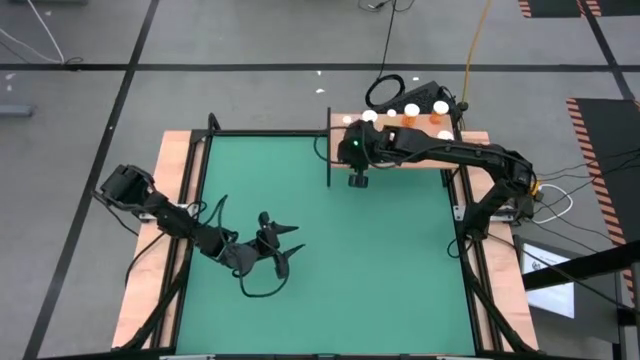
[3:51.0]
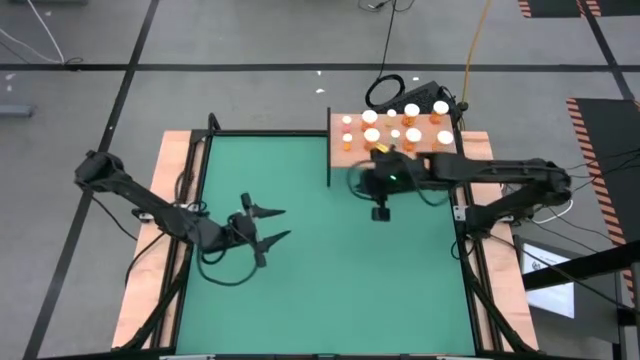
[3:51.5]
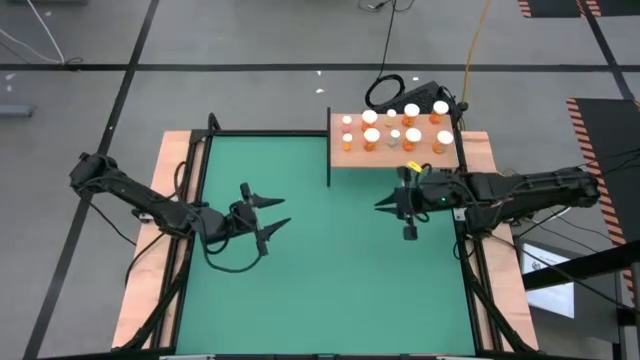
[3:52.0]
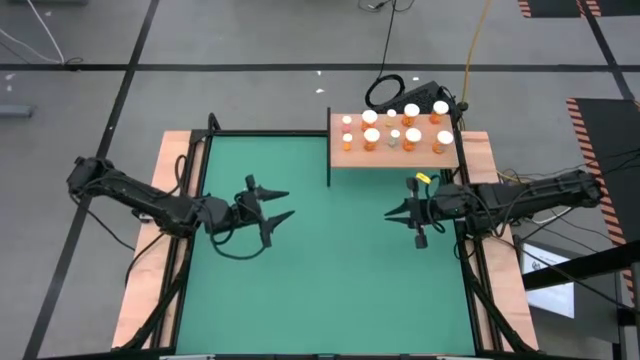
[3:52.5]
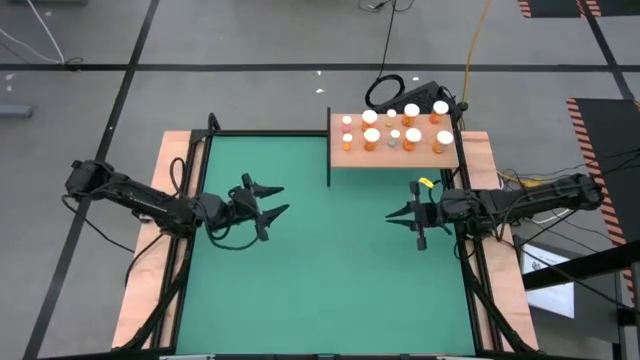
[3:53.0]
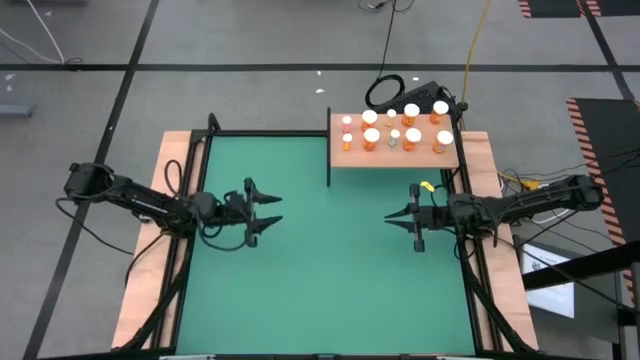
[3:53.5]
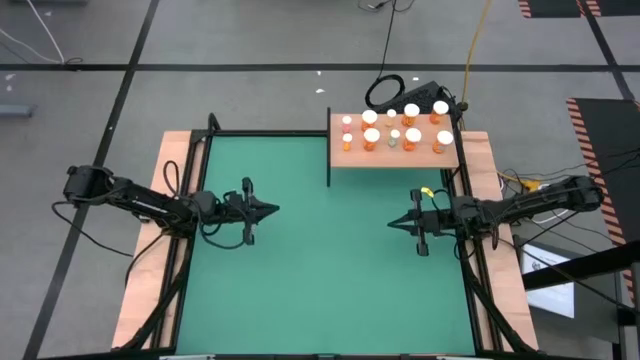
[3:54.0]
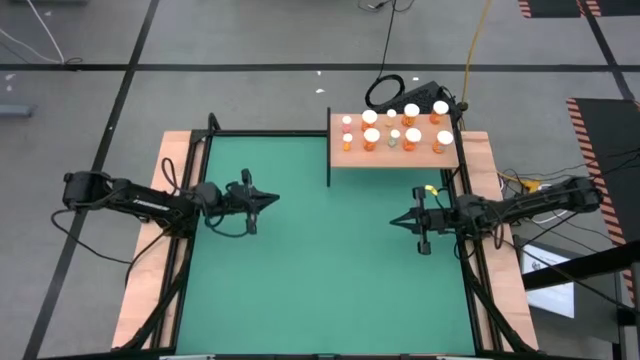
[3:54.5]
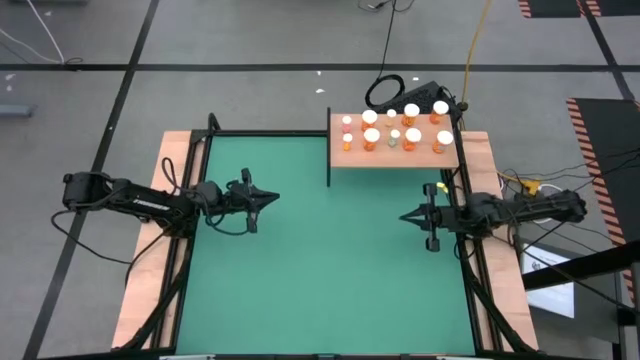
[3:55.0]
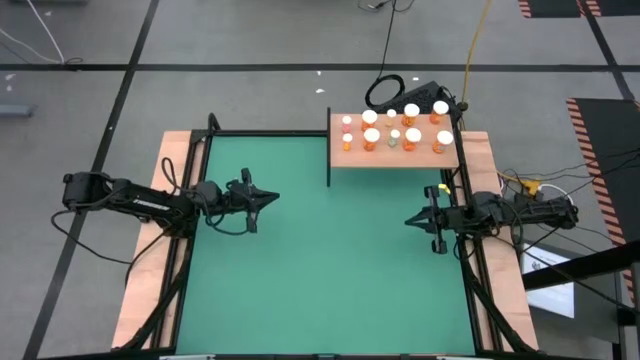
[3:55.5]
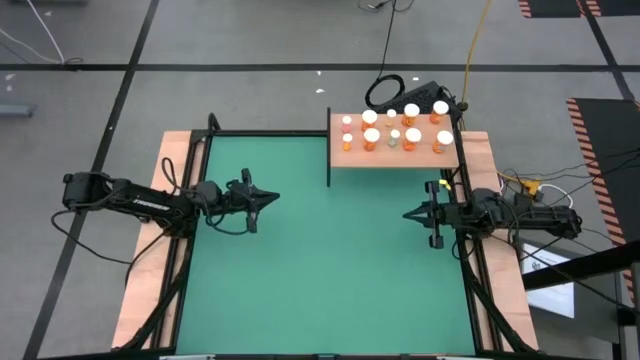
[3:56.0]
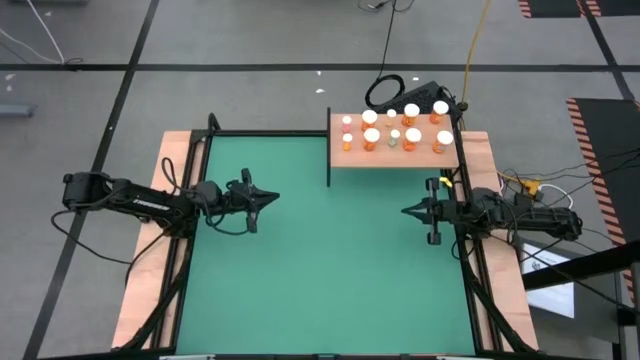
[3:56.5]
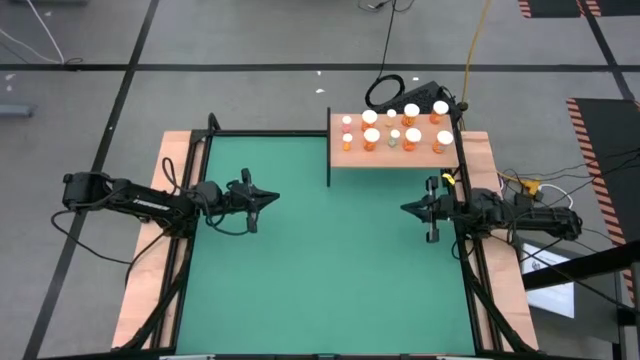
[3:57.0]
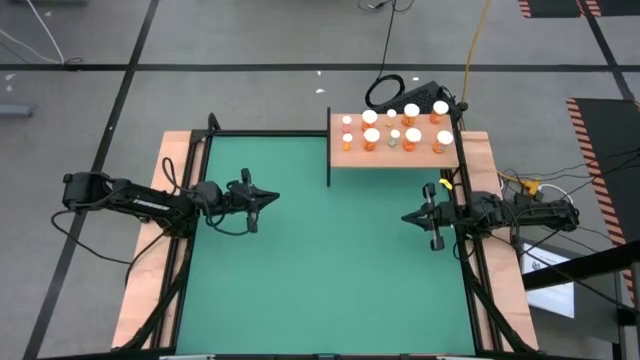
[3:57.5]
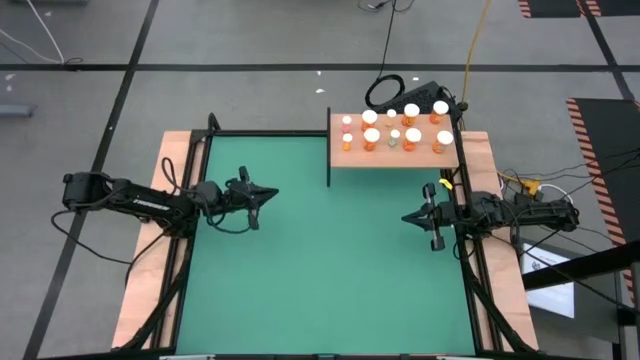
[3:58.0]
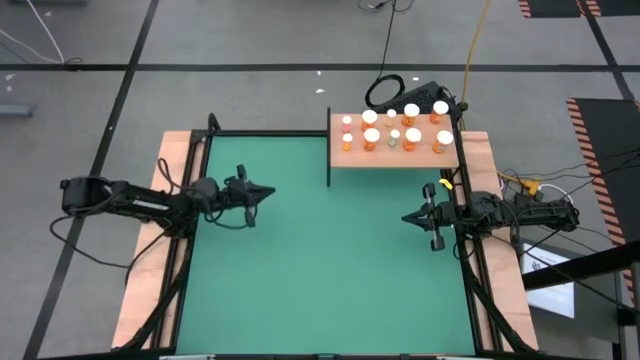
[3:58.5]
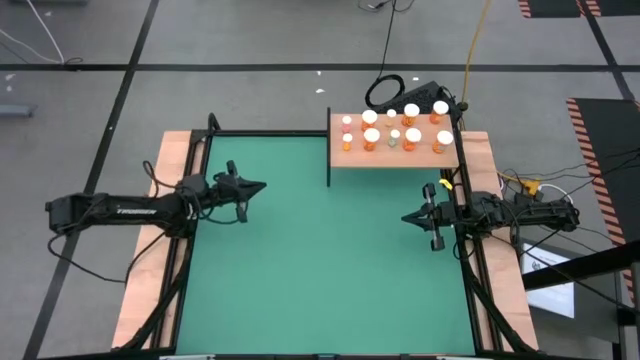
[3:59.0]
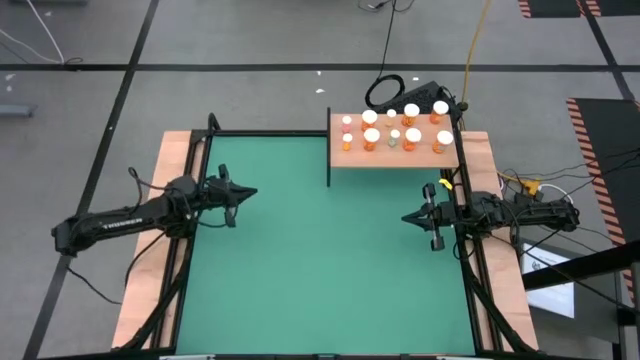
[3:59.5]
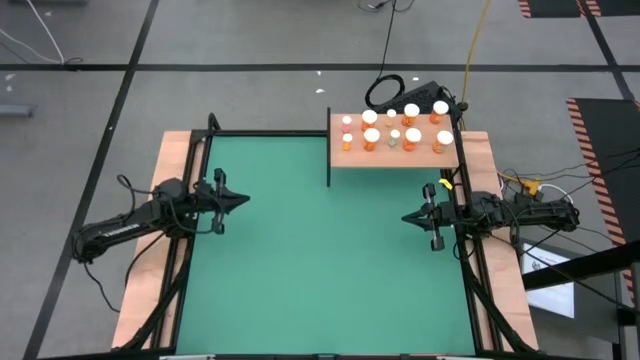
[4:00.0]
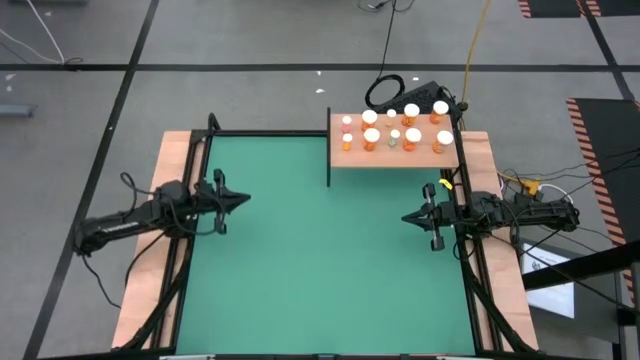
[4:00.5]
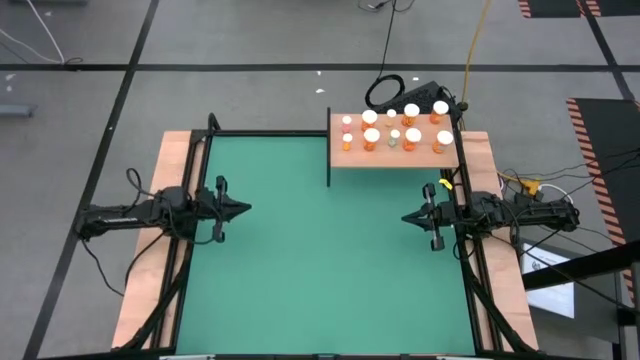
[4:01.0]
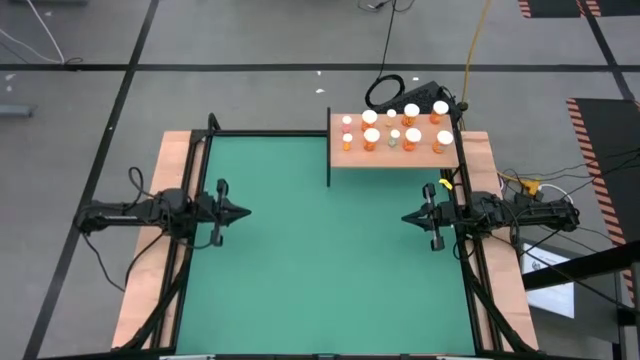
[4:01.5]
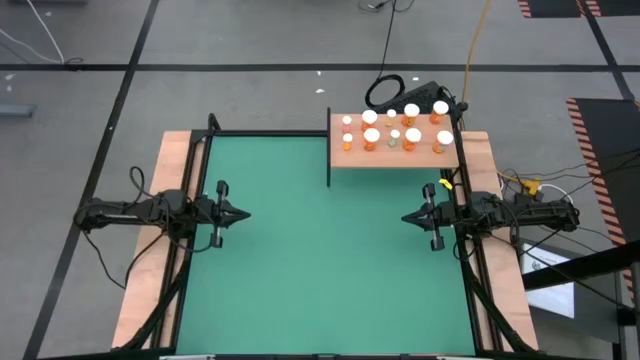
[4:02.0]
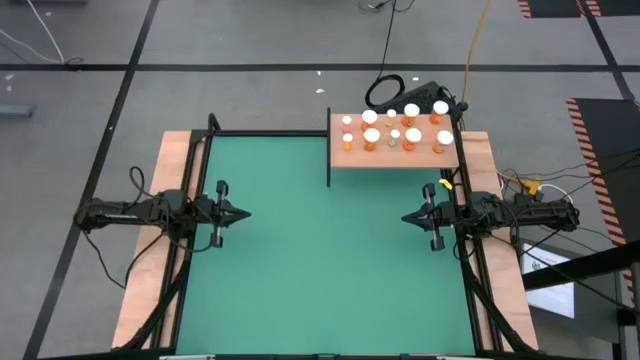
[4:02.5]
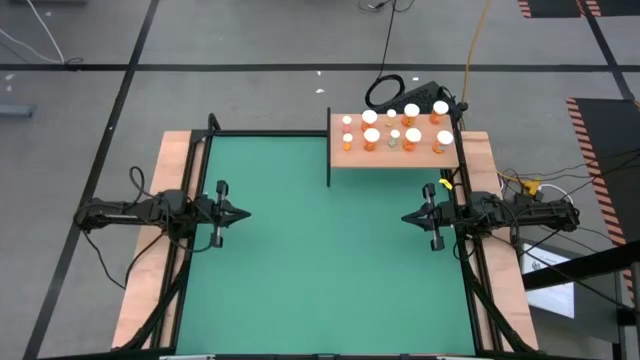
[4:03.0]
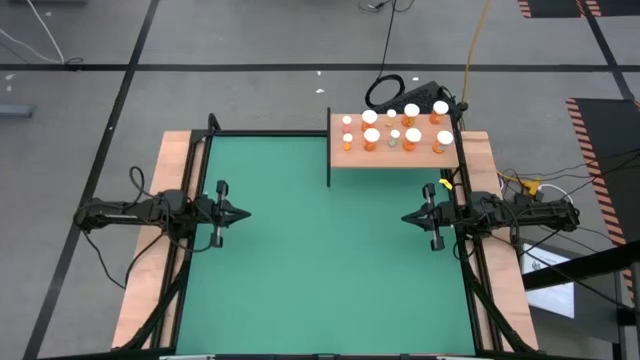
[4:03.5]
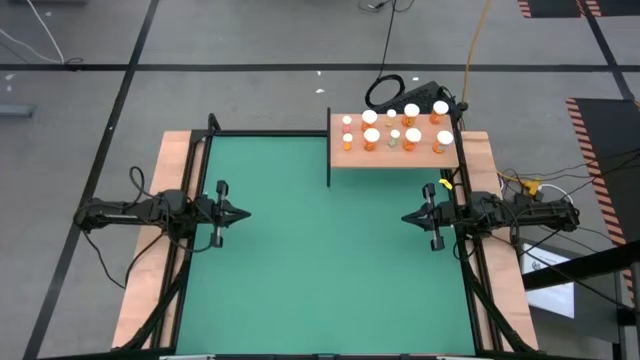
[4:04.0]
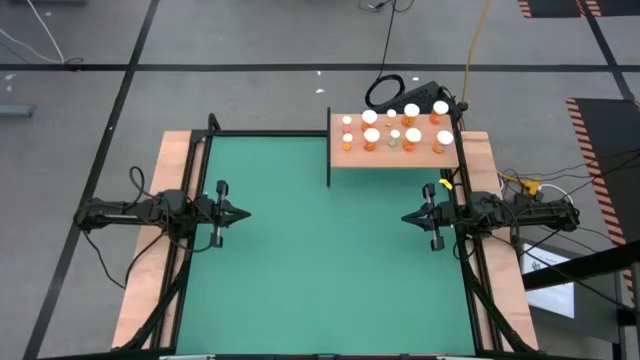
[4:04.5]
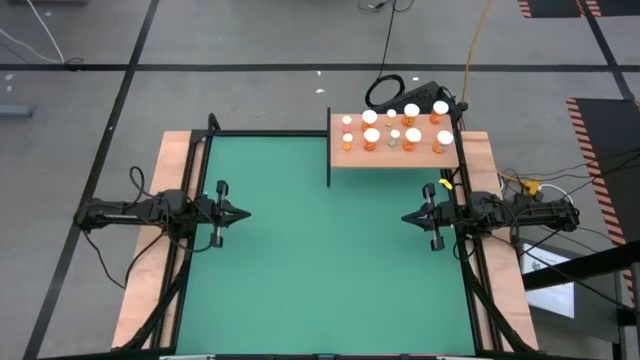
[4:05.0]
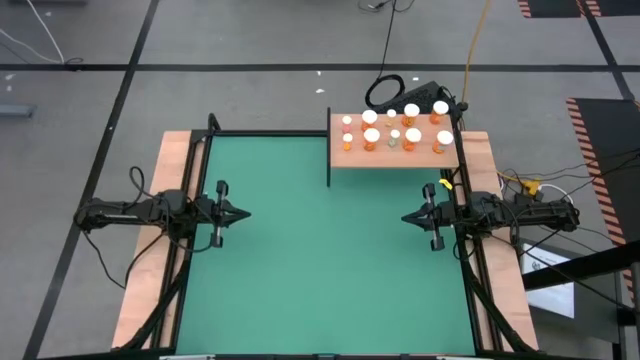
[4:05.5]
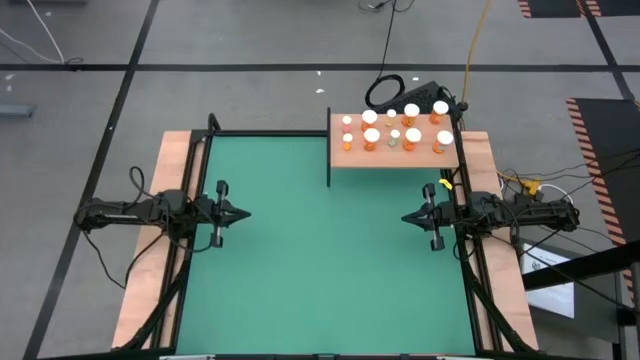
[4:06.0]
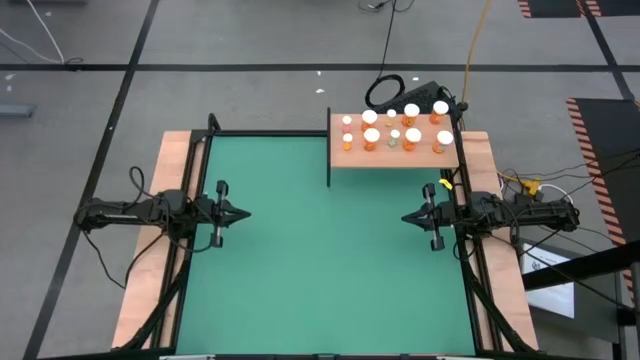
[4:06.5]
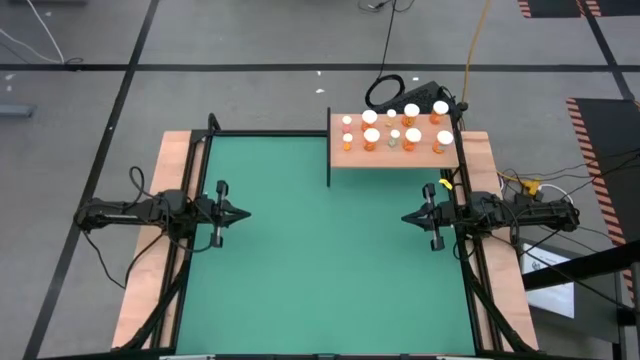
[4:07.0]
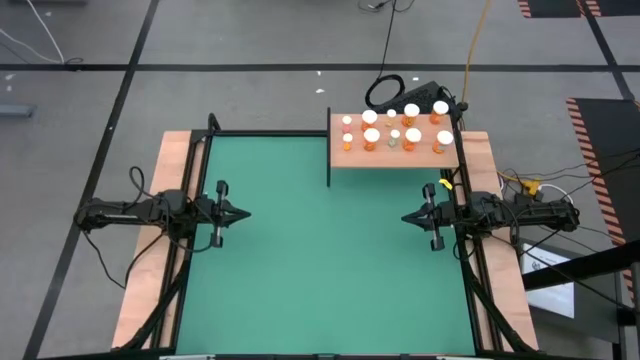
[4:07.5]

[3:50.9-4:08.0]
Task: Pick and place medicine bottles onto shelf by color
Return to Home Position

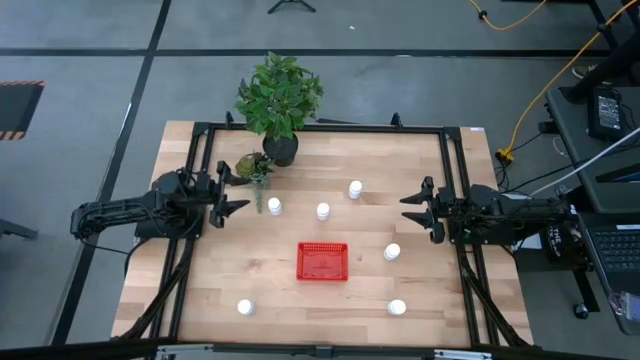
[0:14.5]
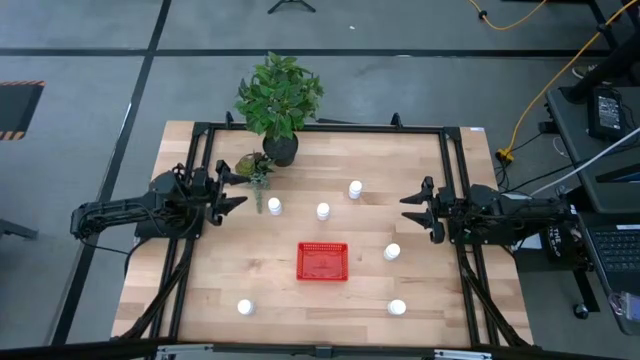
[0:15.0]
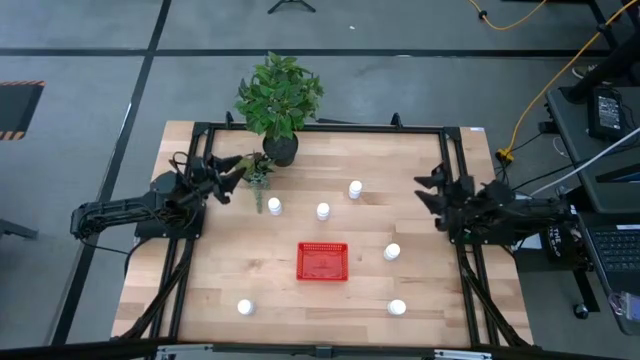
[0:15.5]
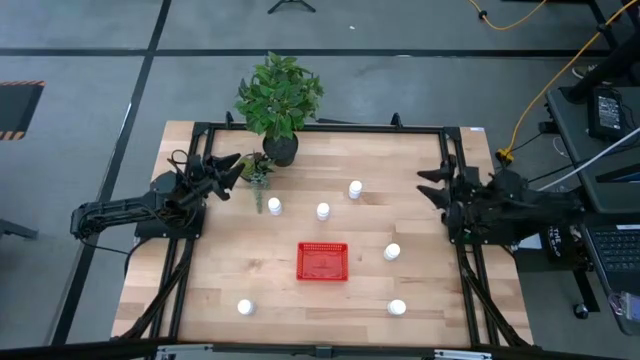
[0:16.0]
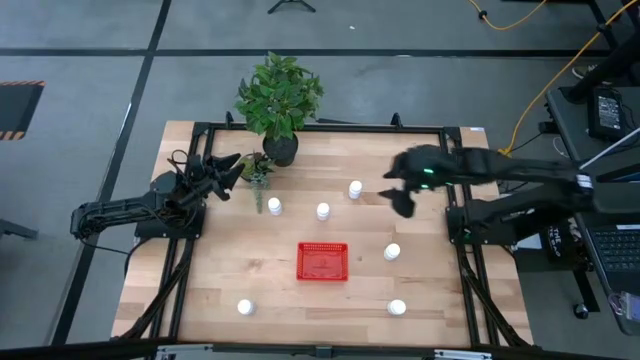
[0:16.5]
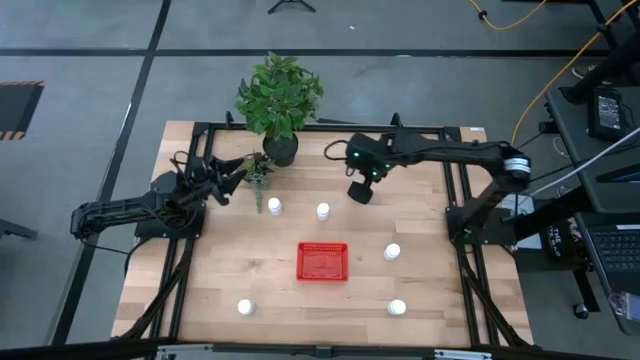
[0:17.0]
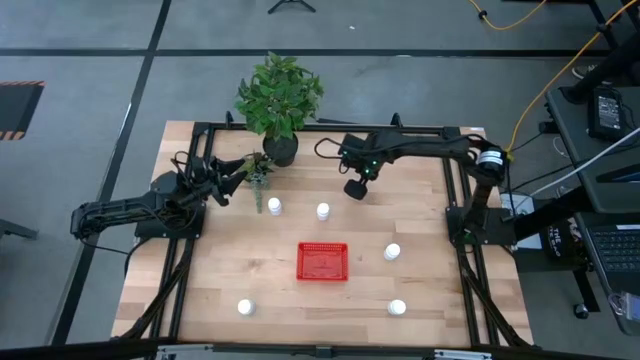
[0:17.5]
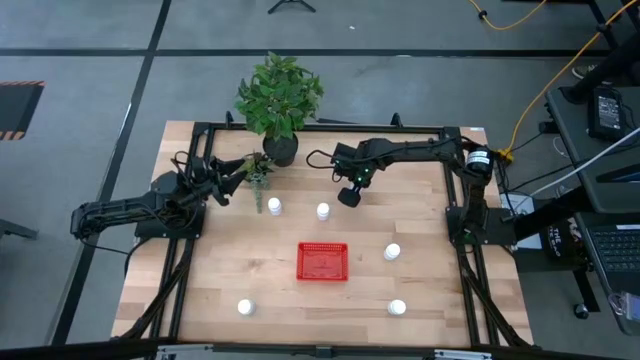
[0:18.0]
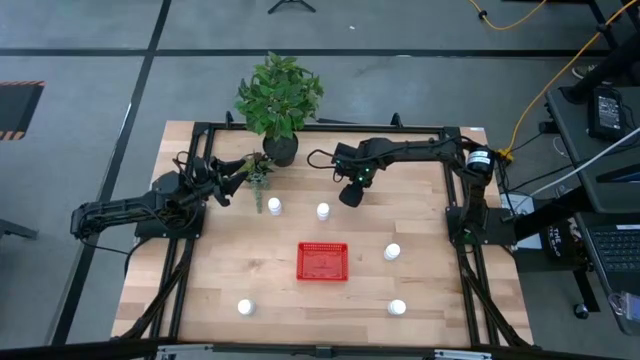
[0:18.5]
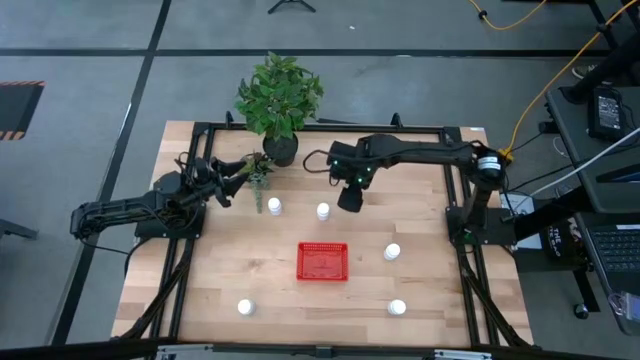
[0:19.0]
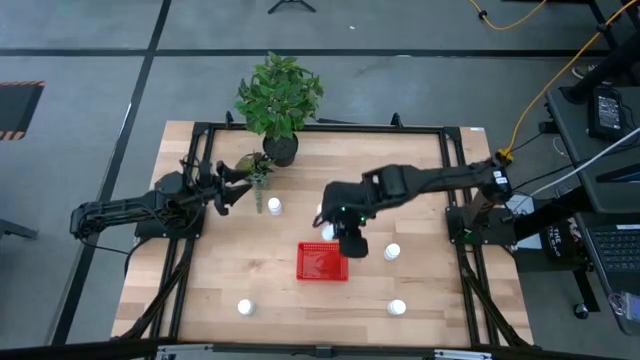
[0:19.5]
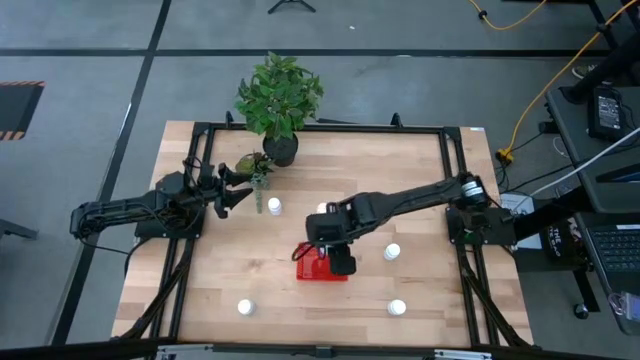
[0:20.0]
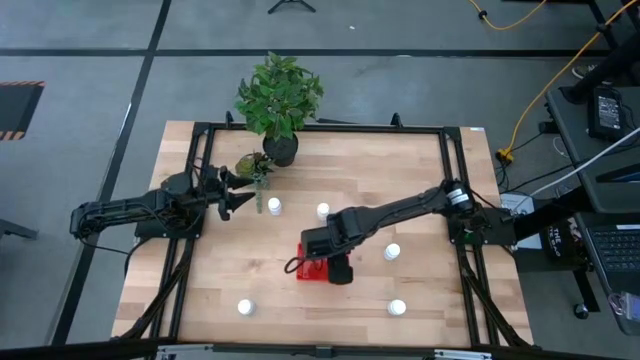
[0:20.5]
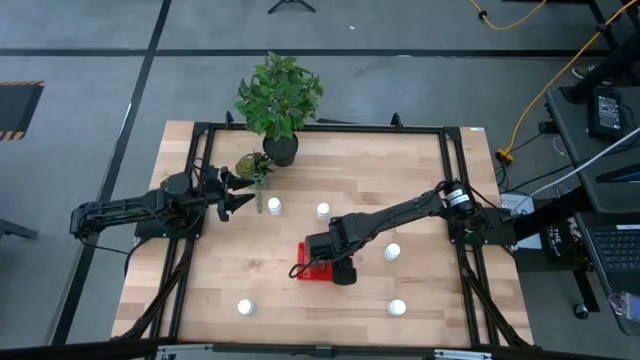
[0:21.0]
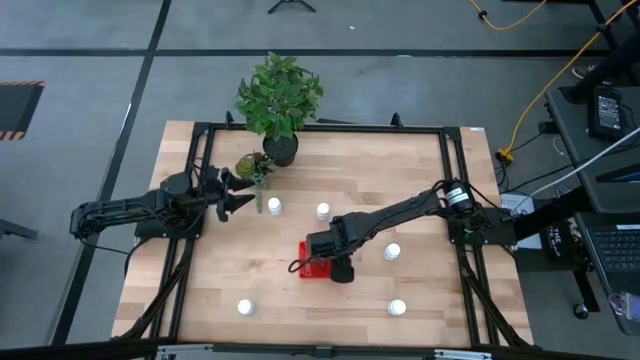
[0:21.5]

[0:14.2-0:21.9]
Task: Pick and place pill bottles into a basket
Put the white pill bottle into the bin
